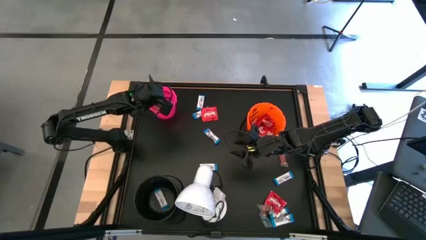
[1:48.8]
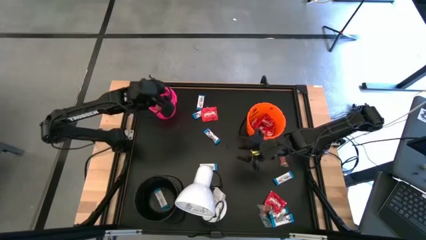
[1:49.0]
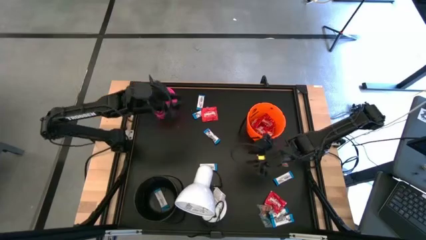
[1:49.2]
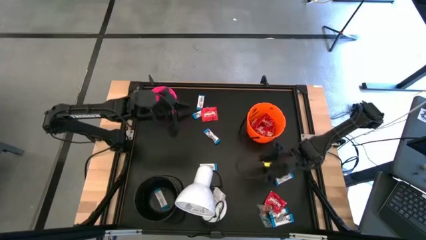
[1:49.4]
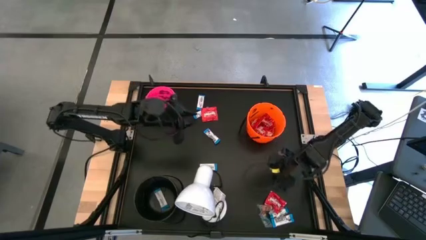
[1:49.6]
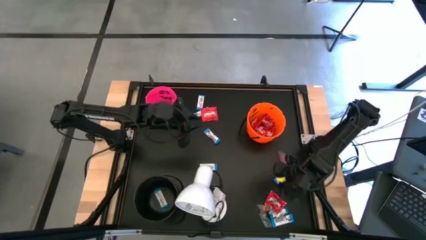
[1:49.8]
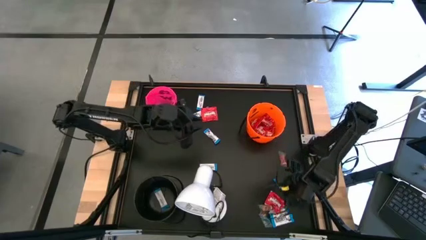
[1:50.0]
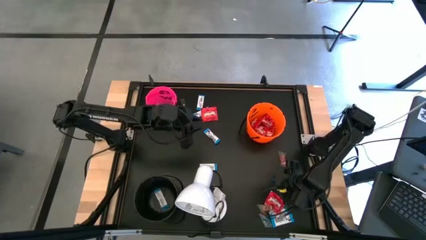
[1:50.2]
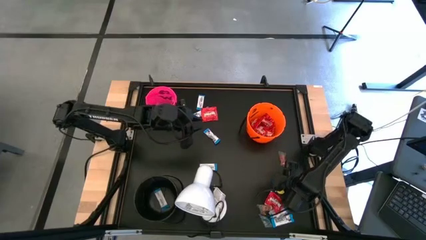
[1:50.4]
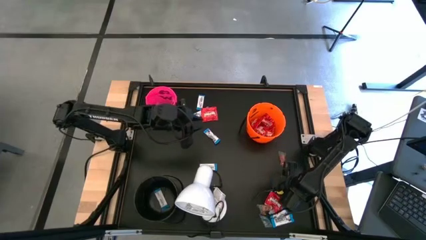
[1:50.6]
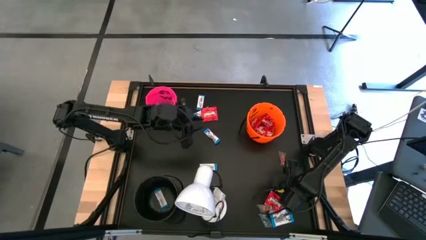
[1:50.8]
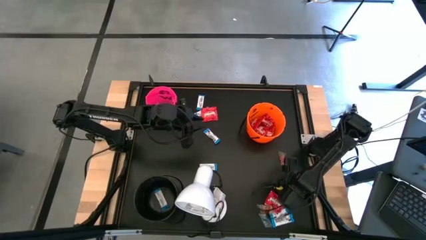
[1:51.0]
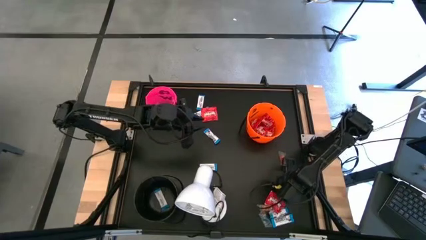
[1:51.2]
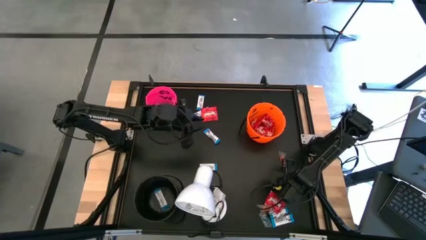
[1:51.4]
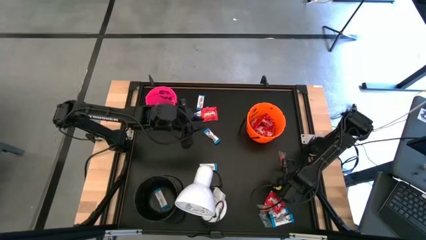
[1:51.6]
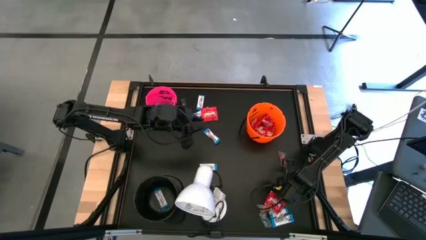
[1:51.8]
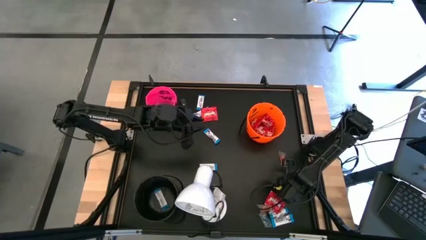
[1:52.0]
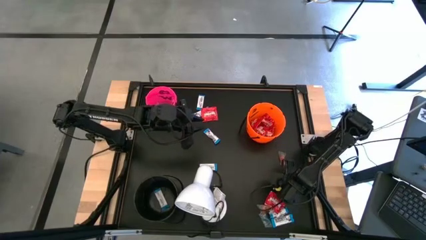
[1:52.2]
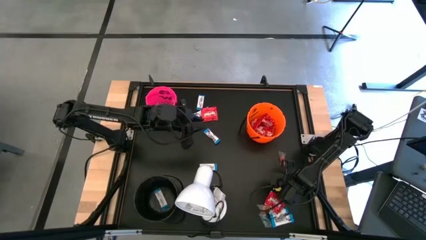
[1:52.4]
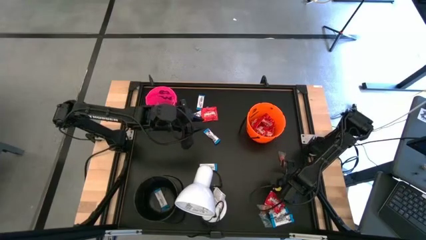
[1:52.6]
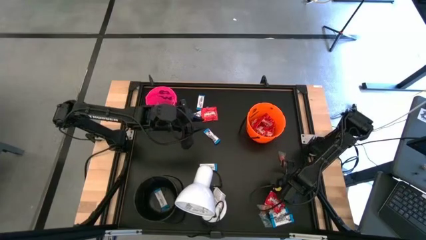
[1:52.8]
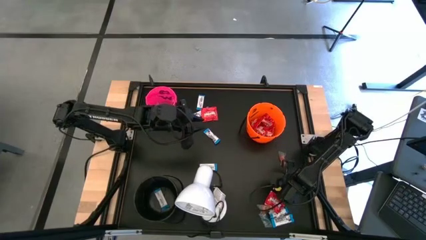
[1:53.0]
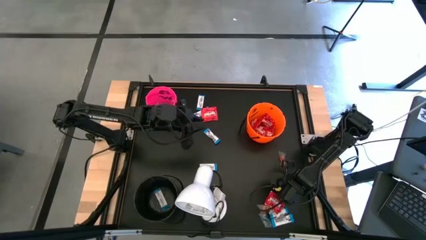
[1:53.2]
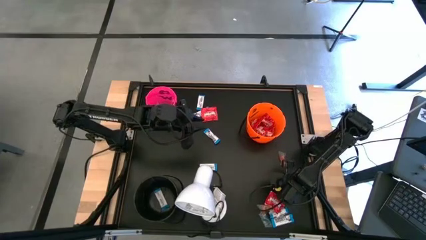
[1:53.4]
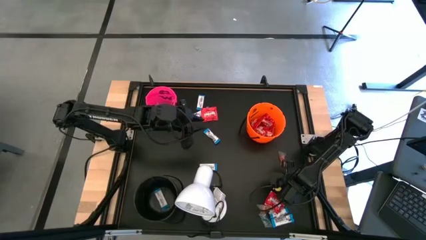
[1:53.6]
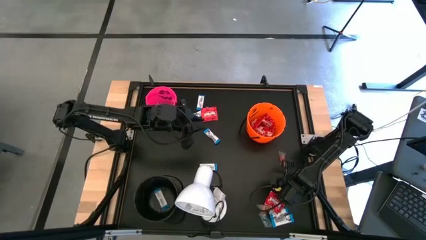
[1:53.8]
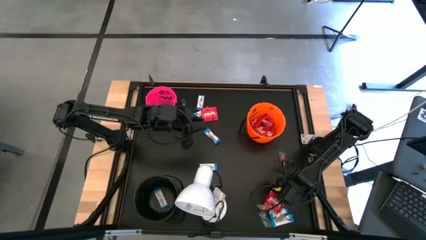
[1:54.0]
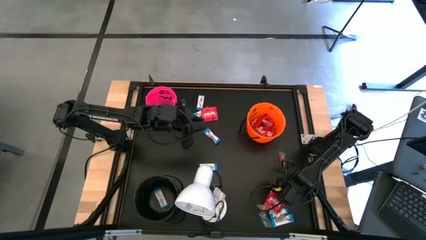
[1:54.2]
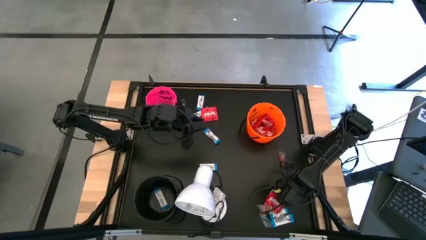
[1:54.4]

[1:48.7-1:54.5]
Task: Sort candy
Put the white chocolate into the black bucket

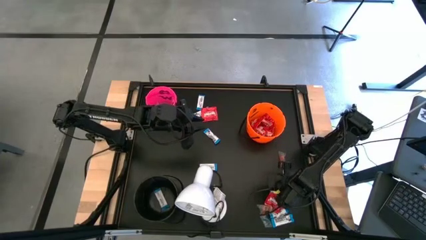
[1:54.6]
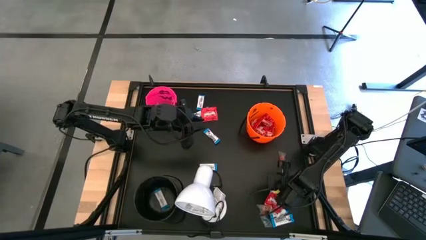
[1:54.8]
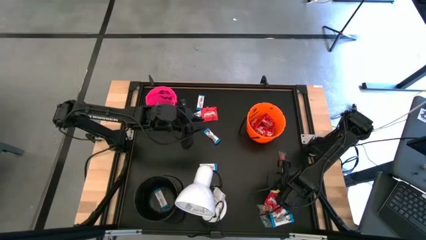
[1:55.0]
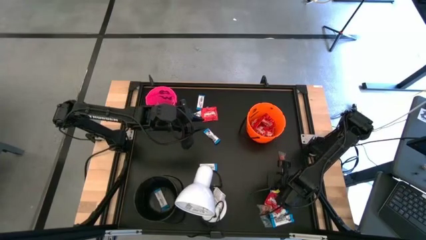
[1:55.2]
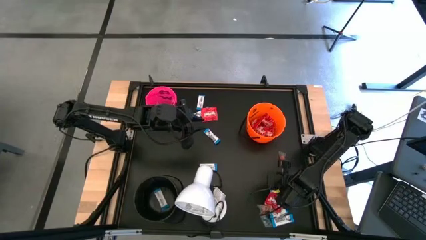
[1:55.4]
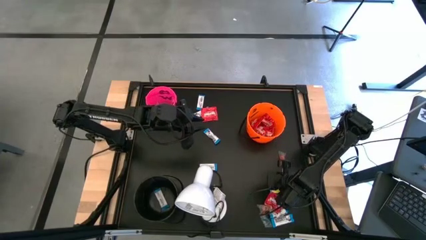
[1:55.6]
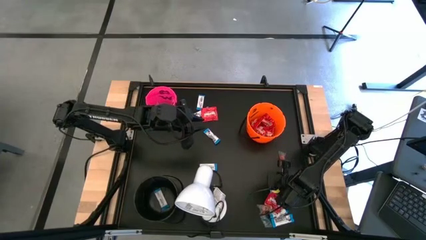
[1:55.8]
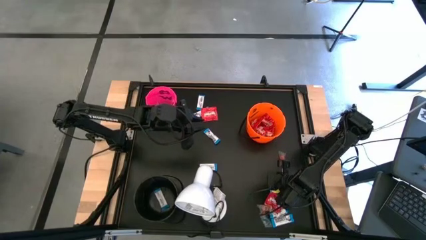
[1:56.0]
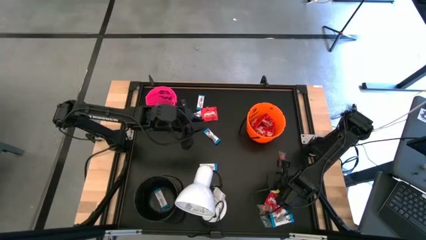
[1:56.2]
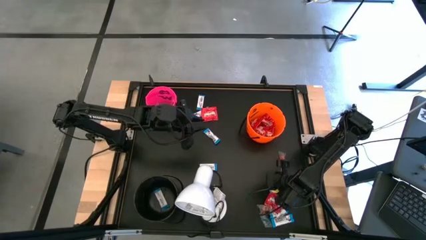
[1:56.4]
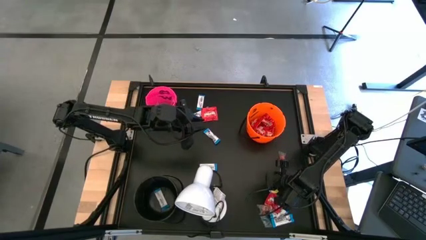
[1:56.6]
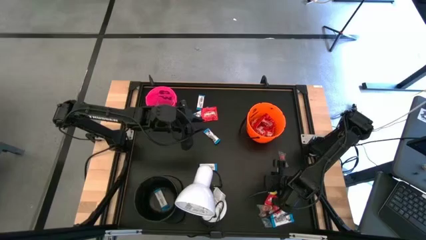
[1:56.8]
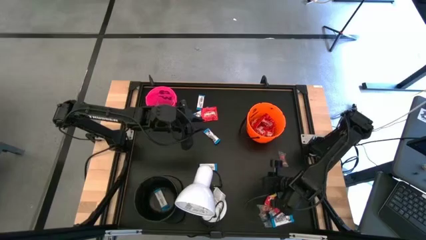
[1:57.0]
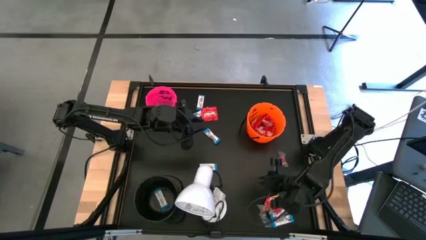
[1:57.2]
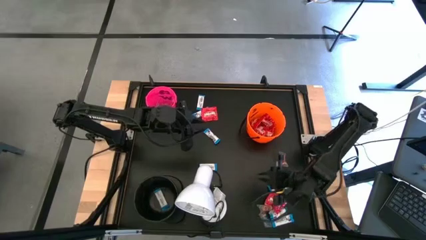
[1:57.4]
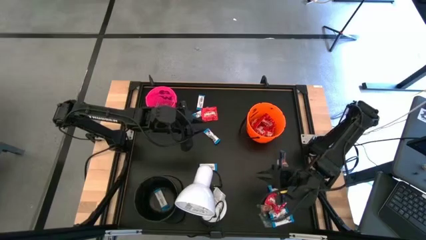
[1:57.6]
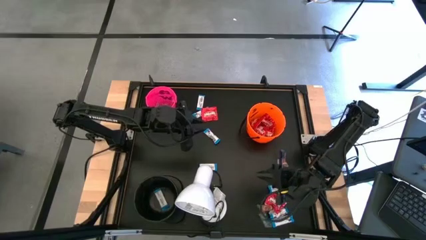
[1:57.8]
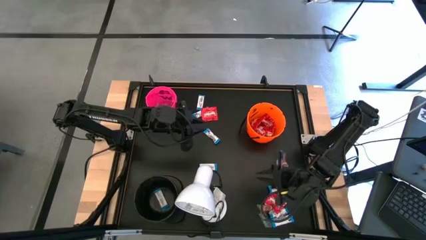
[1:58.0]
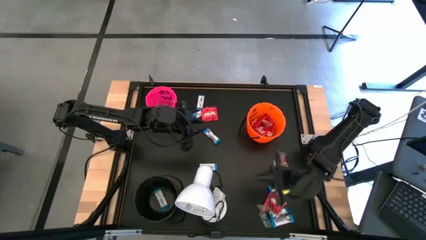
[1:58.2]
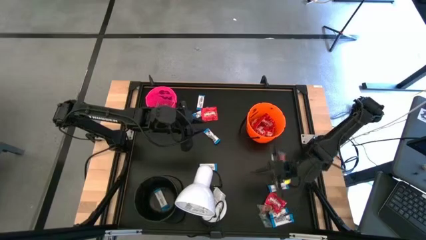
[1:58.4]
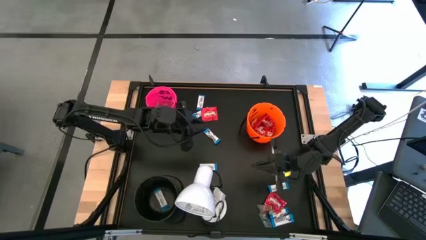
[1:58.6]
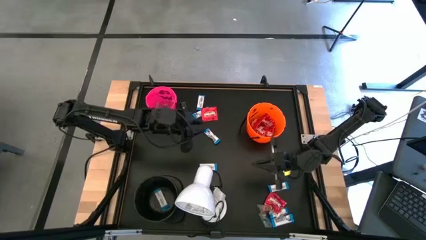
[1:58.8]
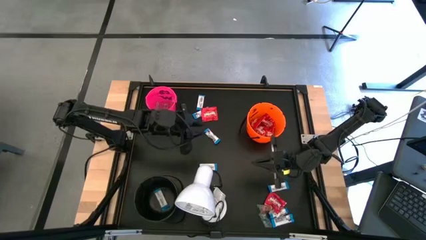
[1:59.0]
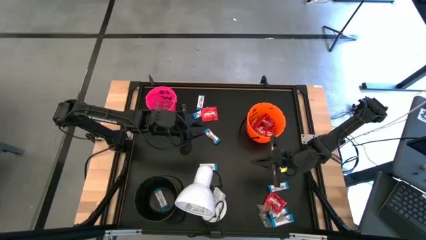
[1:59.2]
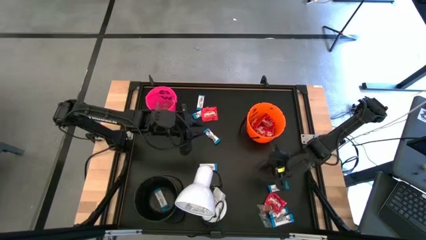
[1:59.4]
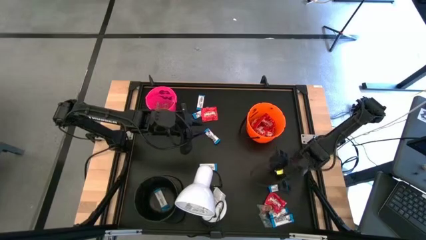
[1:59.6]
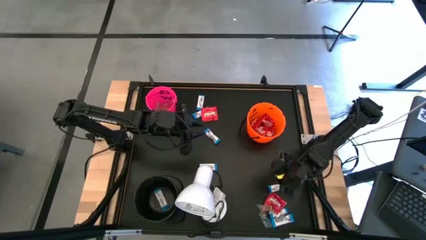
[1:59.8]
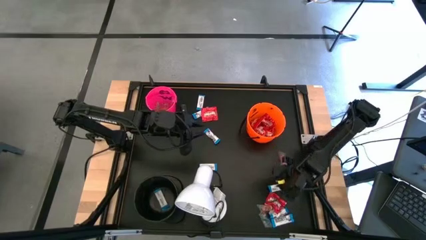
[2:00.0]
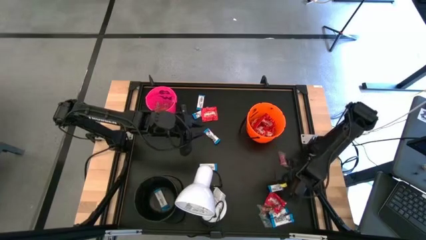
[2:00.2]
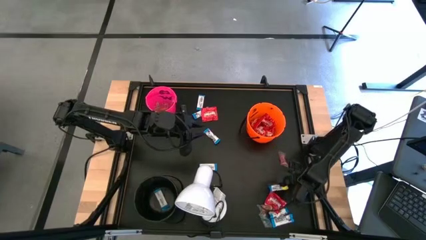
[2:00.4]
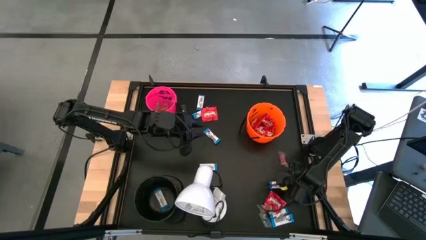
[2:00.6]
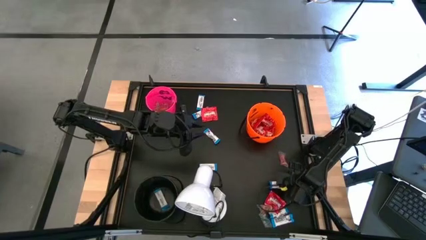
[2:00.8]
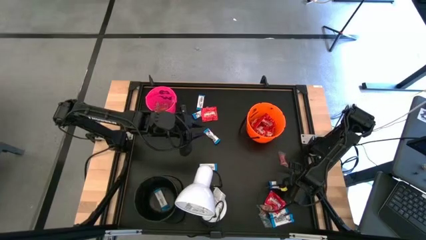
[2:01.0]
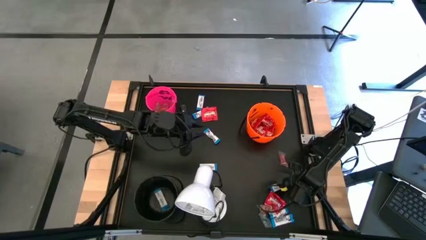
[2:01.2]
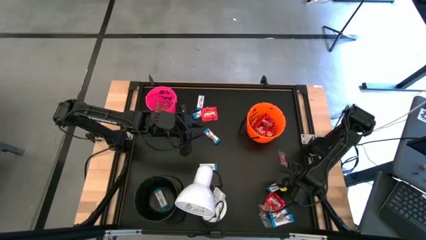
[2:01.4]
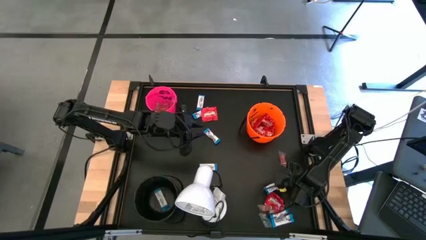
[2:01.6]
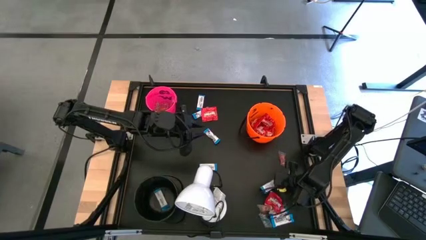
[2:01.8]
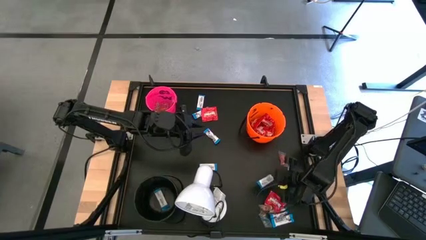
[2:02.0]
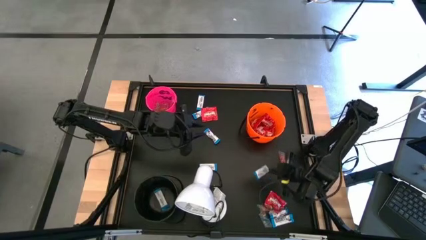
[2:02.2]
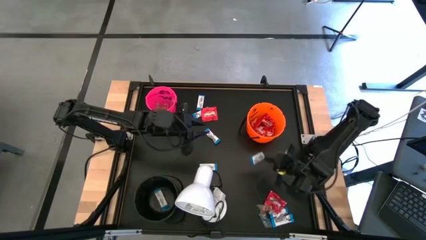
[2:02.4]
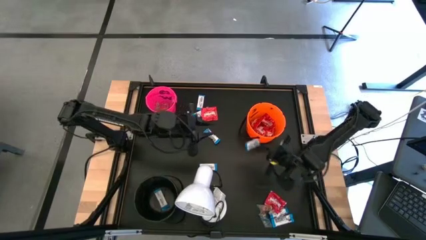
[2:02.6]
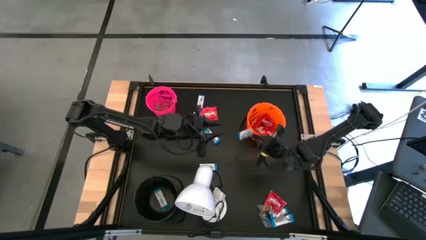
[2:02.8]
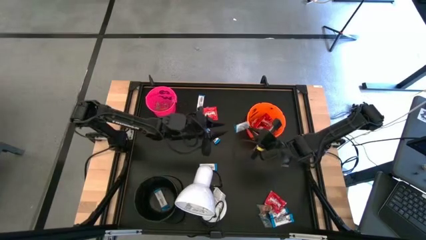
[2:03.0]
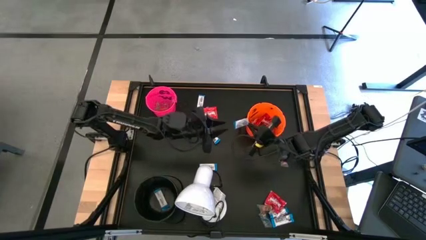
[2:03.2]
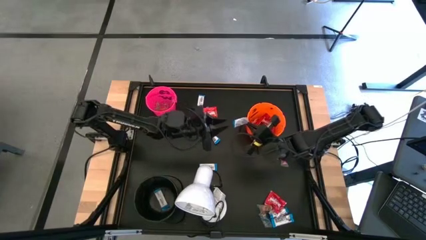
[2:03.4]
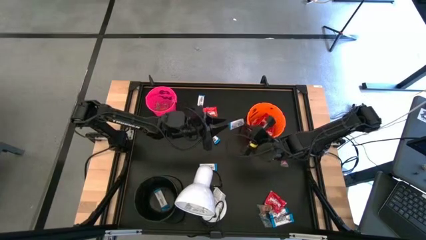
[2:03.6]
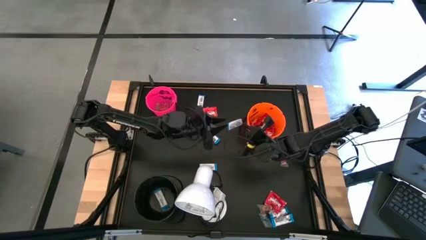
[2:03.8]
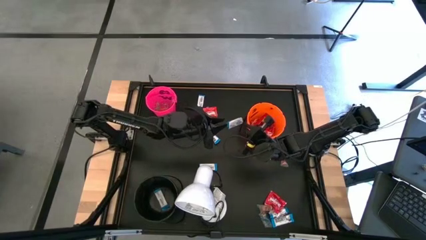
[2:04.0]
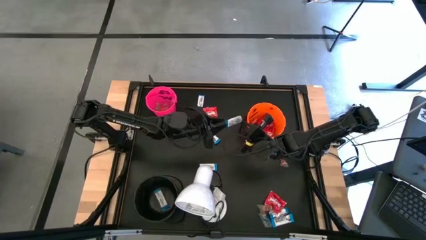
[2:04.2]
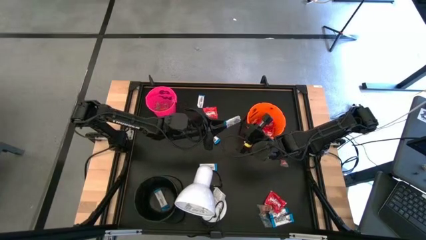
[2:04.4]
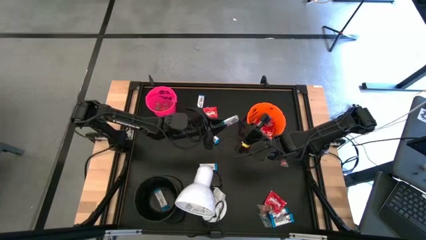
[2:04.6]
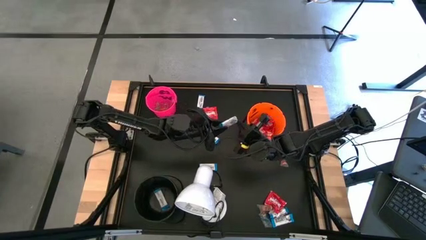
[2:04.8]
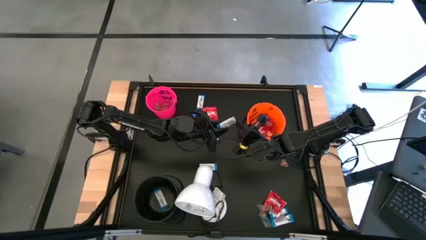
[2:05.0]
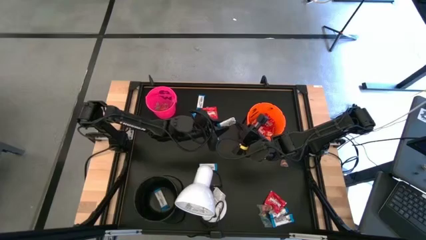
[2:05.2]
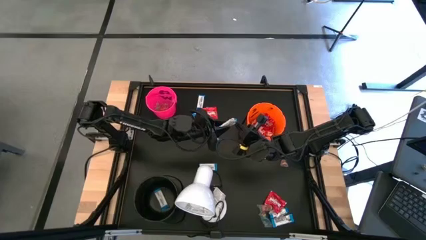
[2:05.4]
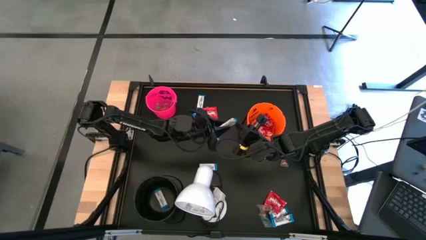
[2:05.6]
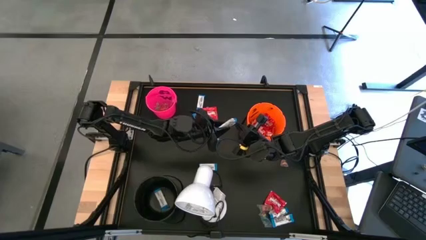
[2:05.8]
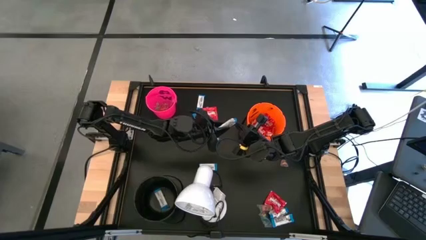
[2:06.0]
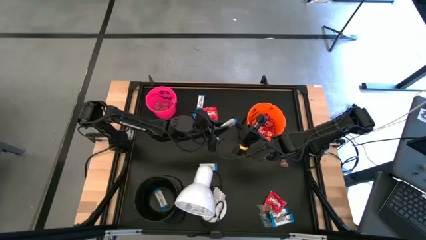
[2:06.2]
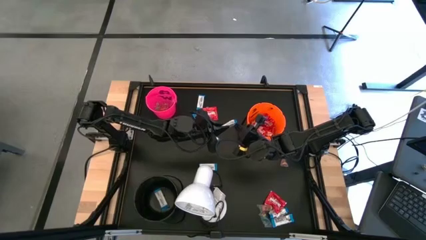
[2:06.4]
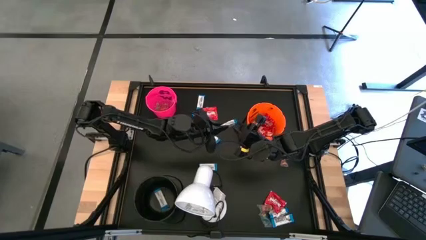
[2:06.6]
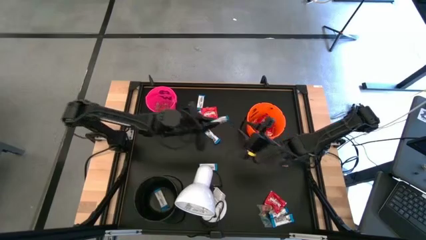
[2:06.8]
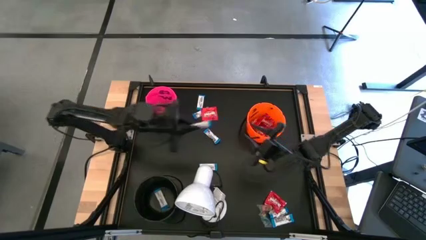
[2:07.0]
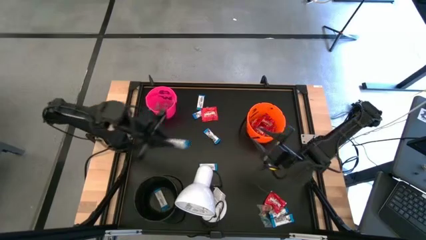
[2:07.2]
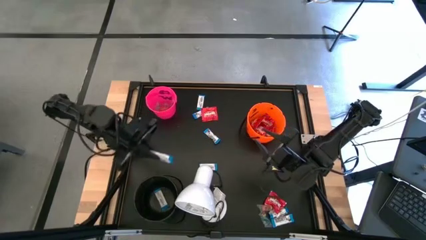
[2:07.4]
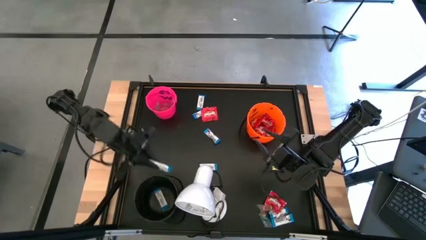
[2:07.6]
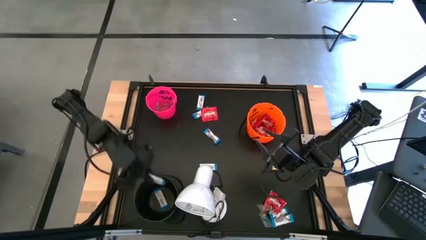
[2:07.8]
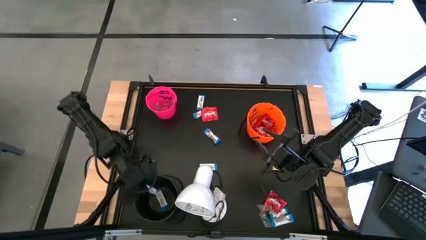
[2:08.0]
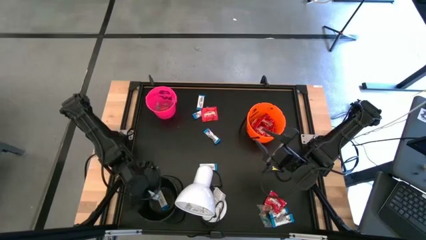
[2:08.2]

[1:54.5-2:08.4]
Put the white chocolate into the black bucket
